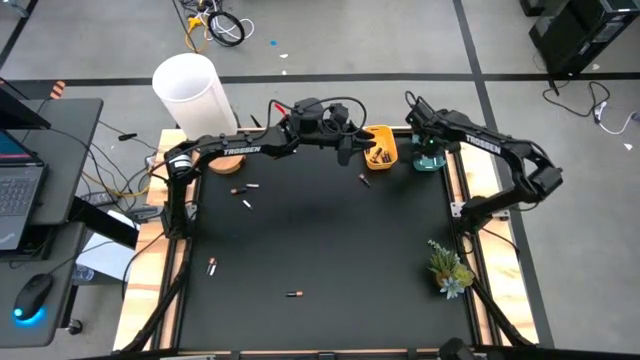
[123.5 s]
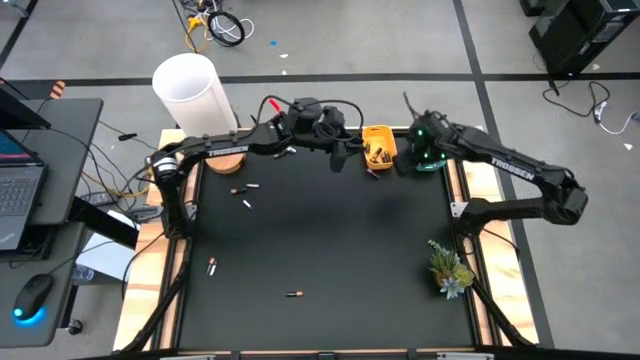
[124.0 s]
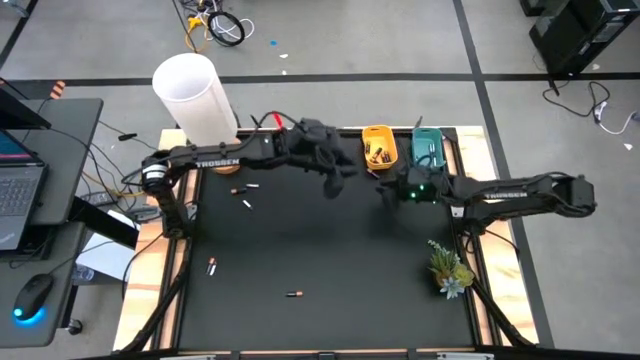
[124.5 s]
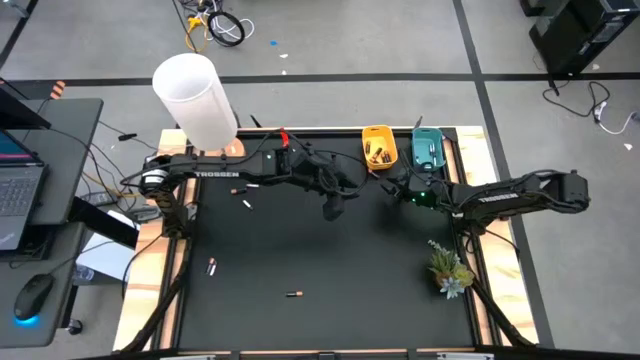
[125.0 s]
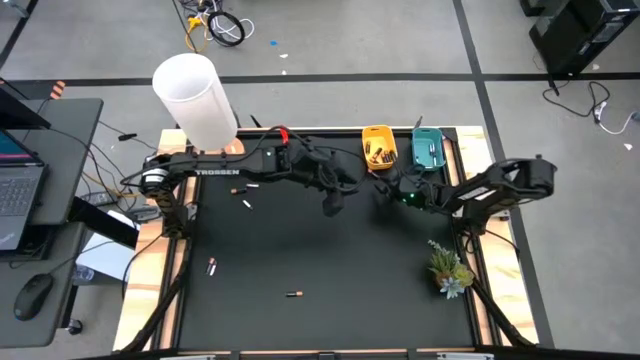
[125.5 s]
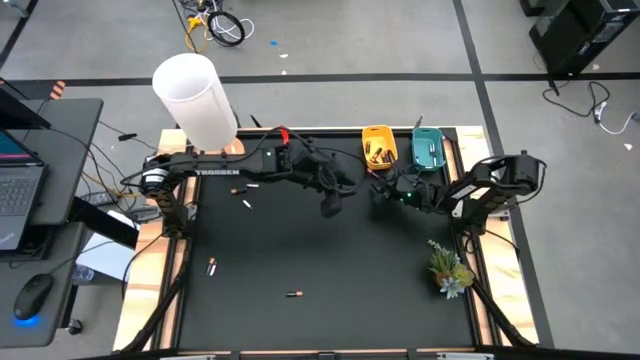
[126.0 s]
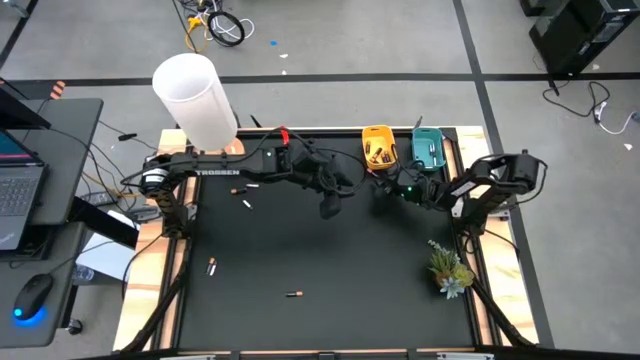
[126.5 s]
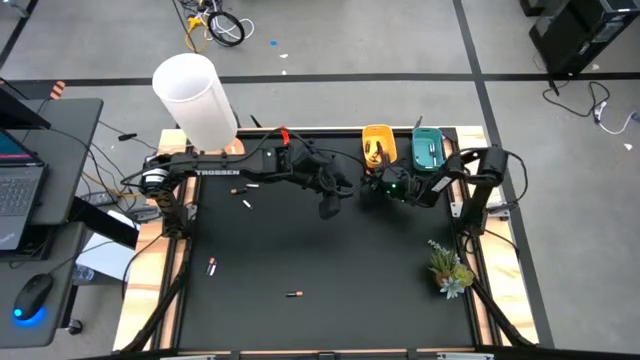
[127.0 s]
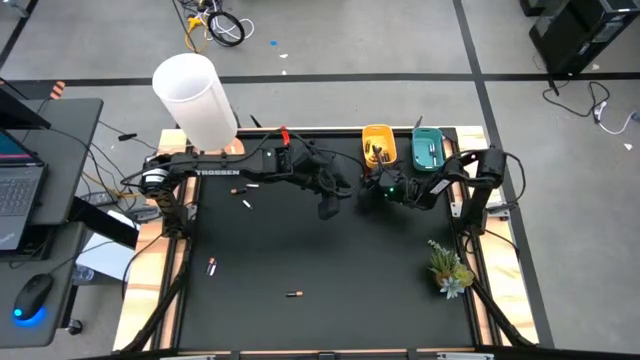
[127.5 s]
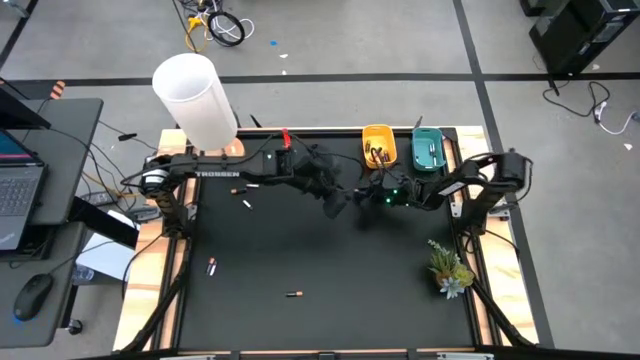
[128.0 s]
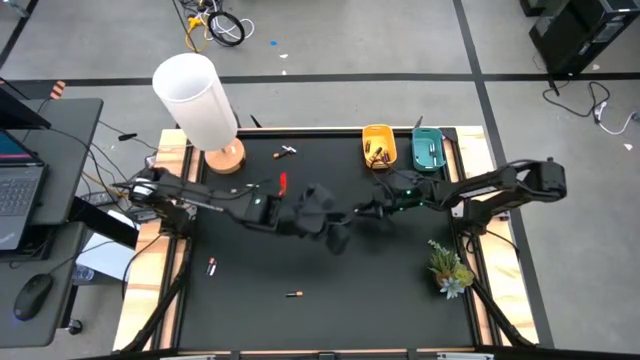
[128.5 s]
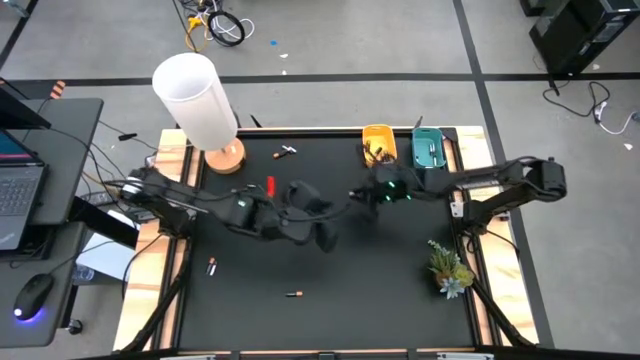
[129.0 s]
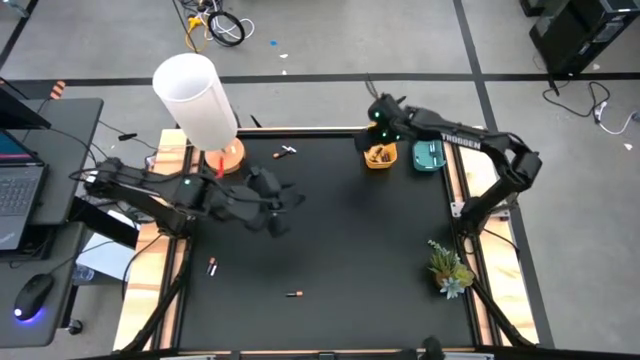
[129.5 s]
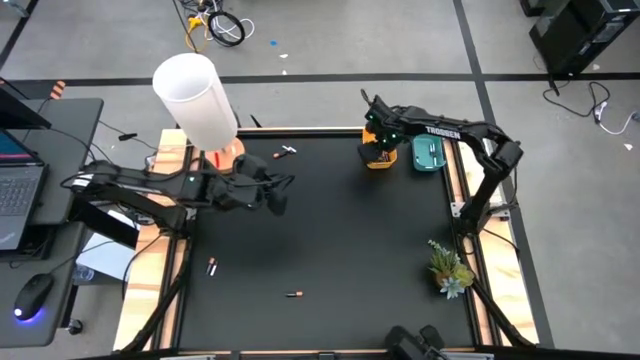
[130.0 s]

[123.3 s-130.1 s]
Task: Sort batteries
Put the black battery into the yellow bin

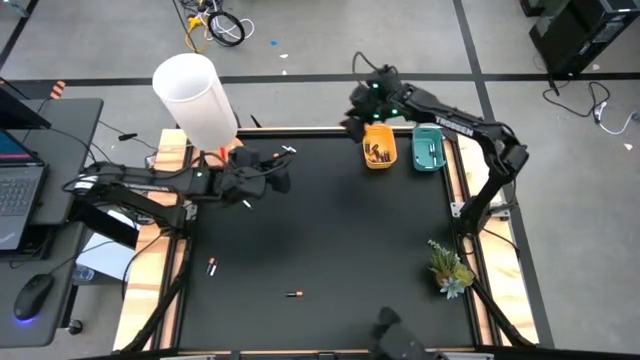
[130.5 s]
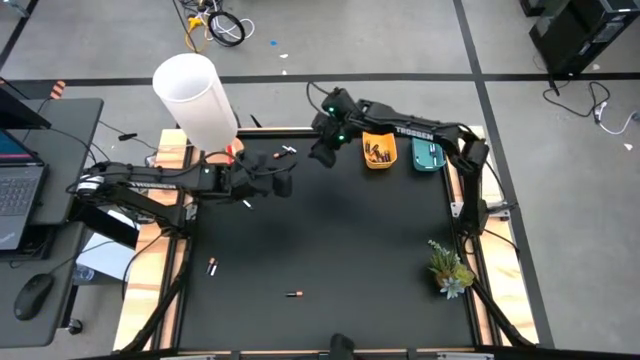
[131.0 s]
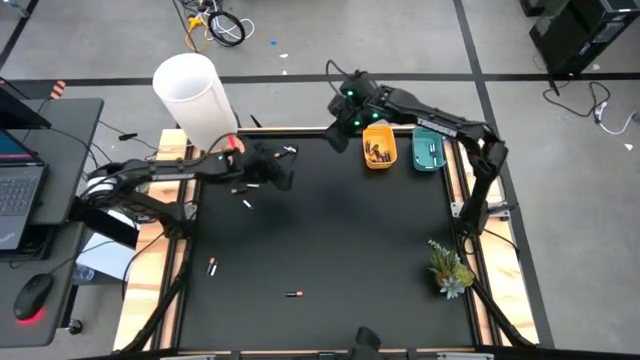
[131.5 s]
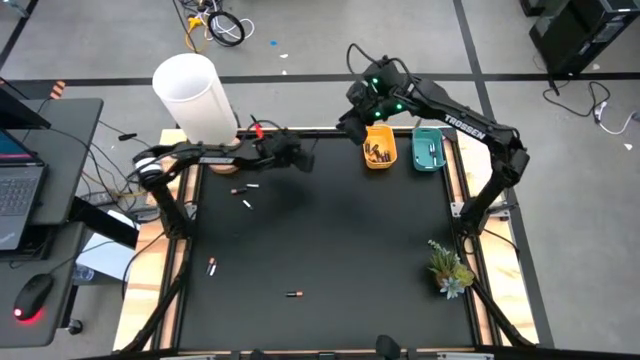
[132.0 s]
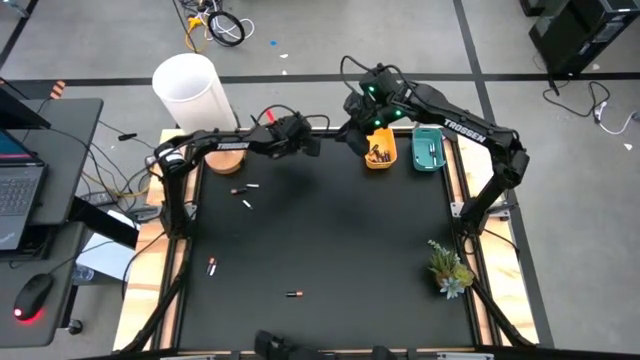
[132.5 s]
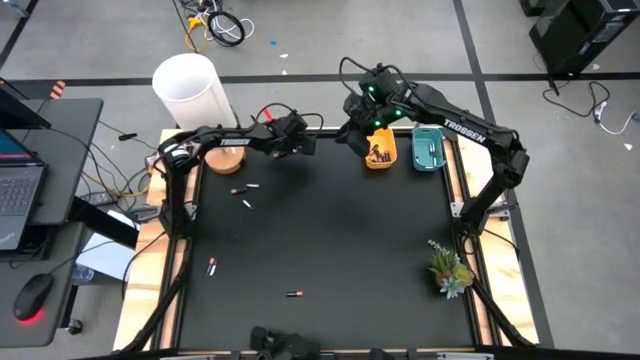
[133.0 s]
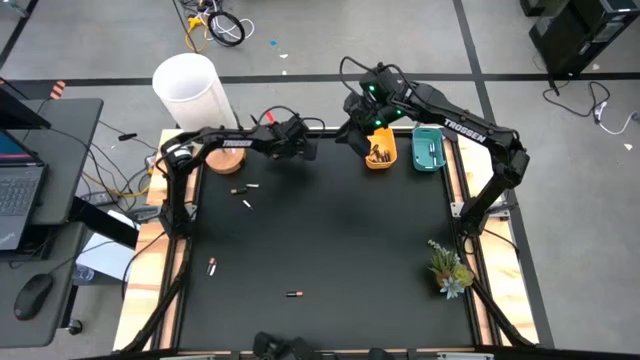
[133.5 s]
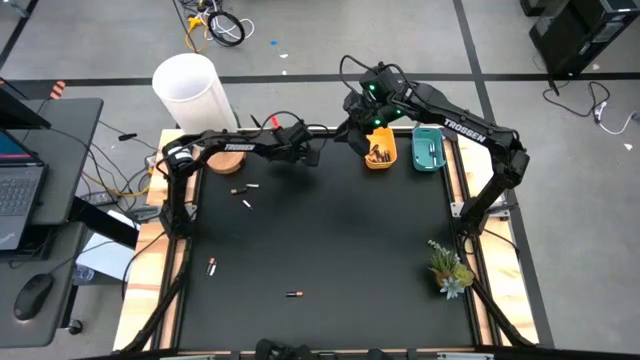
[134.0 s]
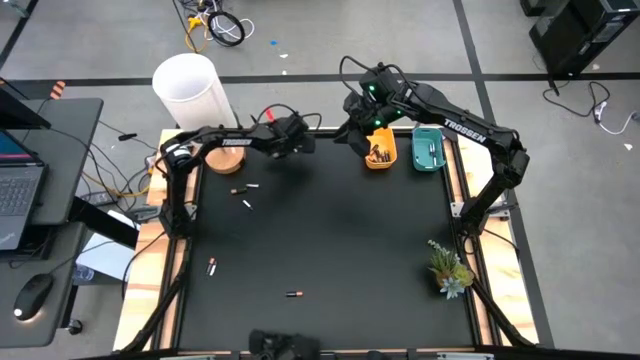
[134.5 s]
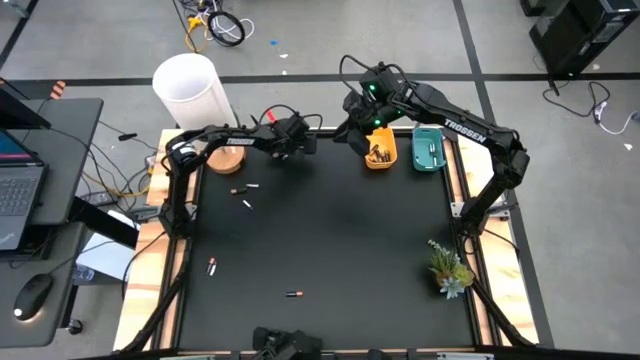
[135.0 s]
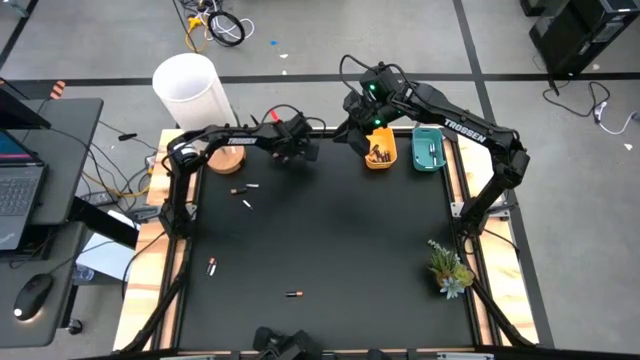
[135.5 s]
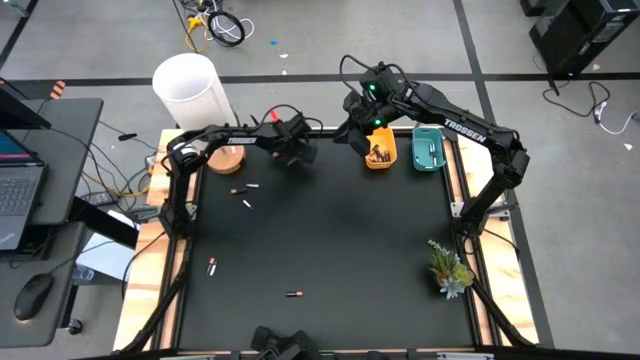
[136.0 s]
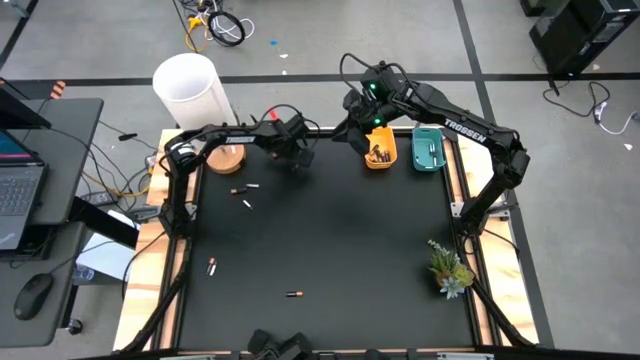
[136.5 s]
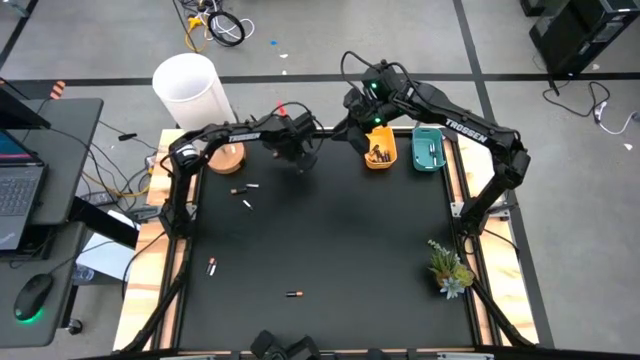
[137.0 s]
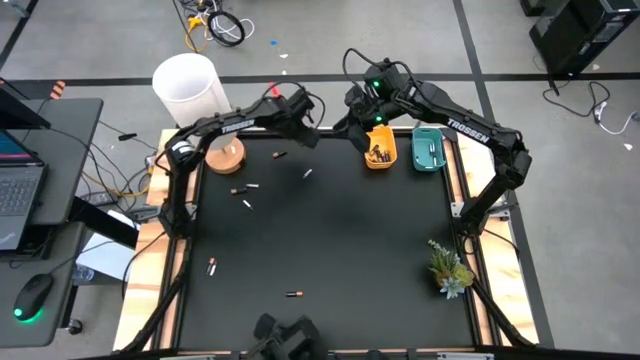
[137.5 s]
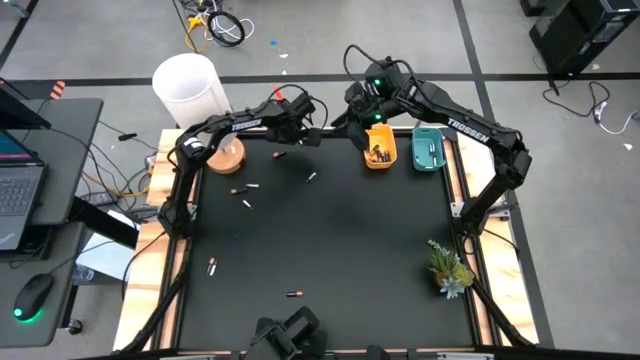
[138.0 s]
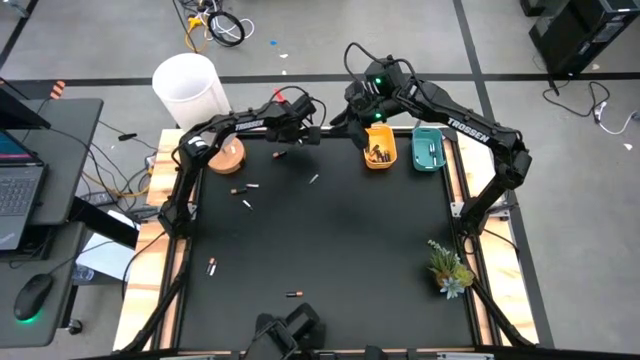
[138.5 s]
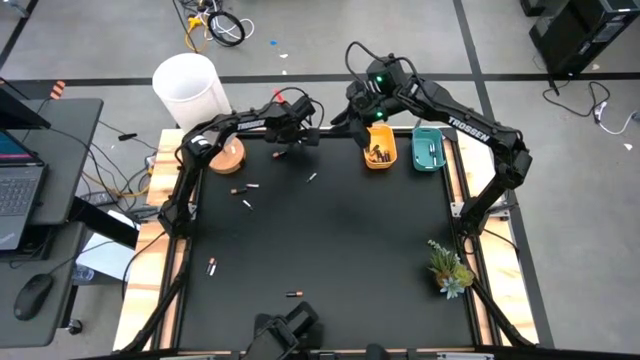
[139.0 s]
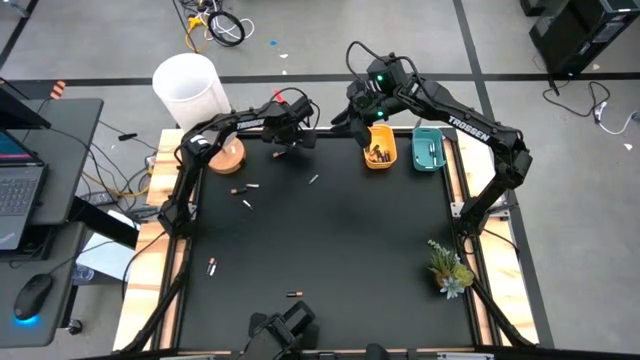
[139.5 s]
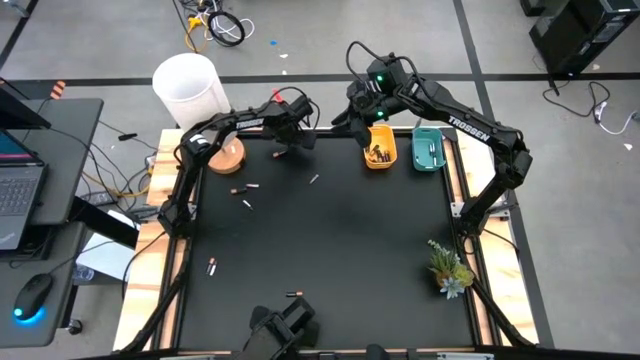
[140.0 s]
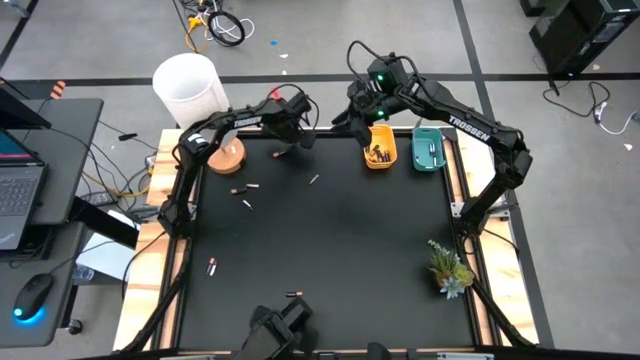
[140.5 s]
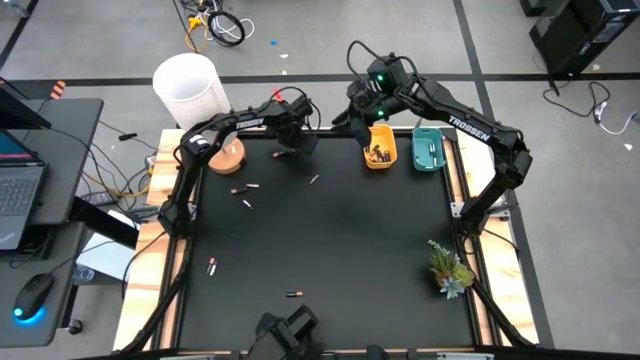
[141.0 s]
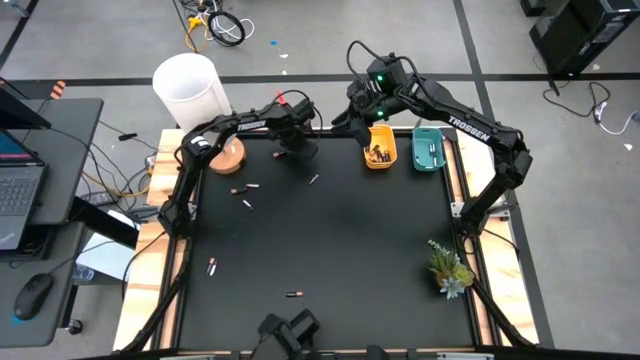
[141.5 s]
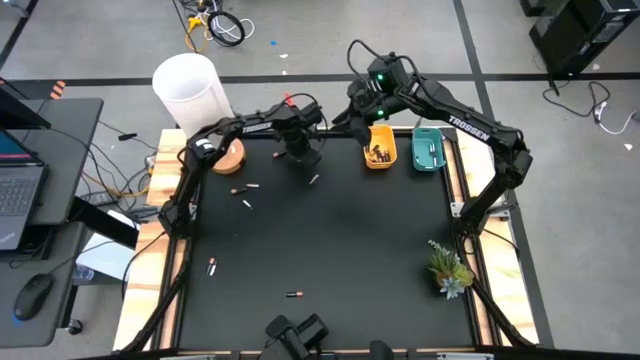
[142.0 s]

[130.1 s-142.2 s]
Put the silver battery into the blue bin

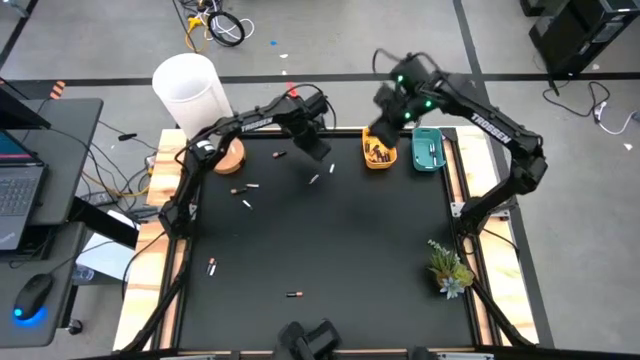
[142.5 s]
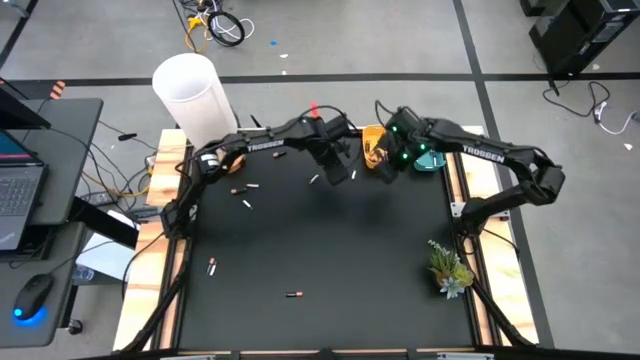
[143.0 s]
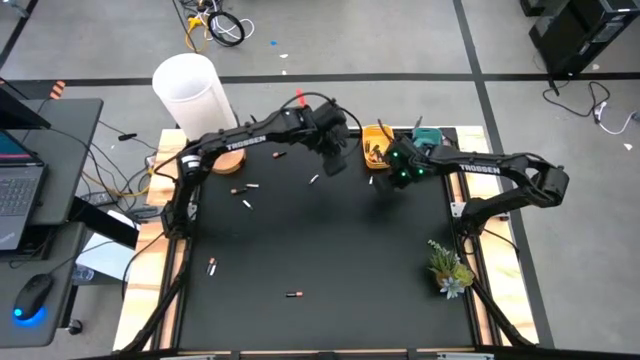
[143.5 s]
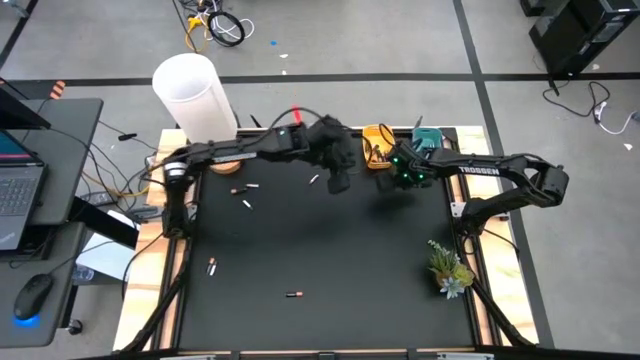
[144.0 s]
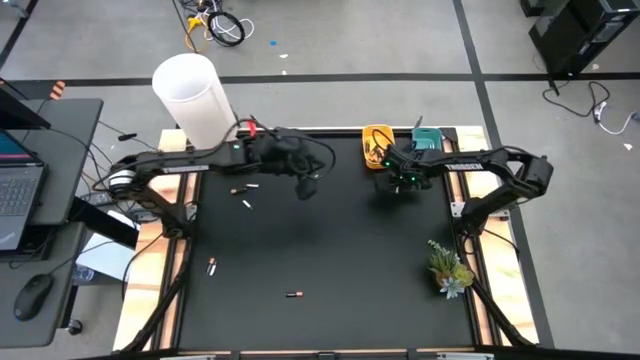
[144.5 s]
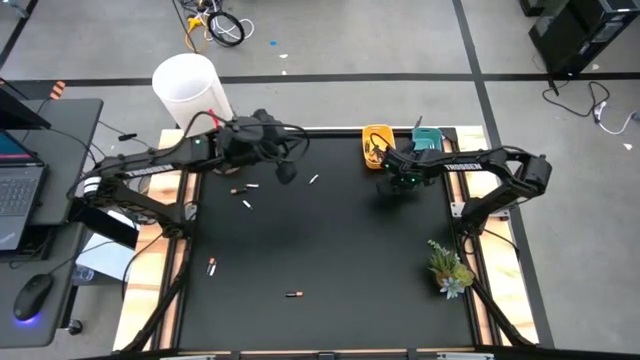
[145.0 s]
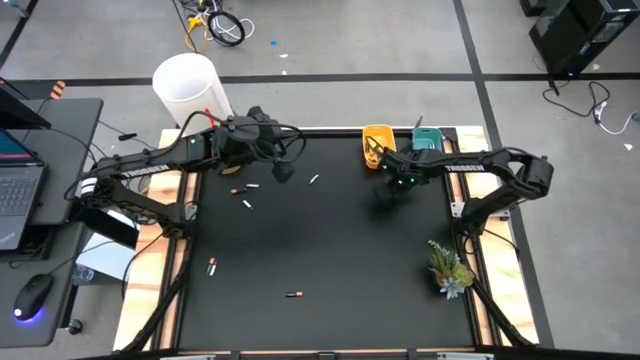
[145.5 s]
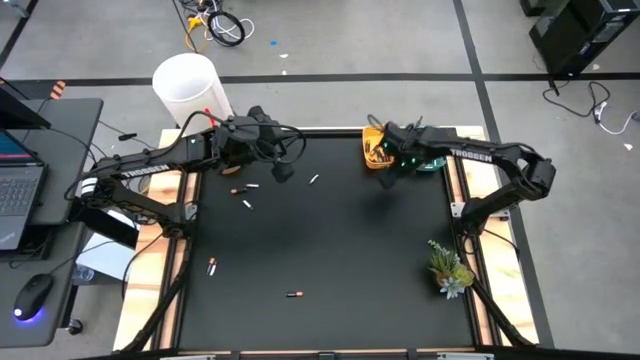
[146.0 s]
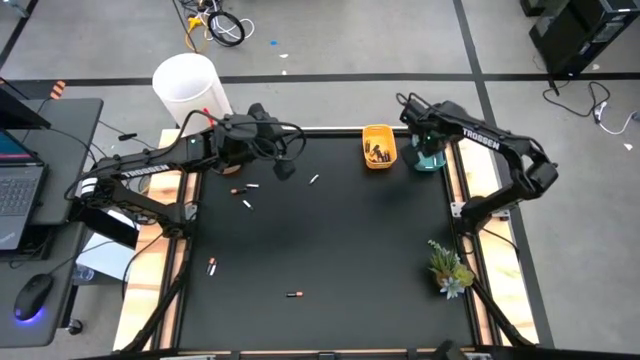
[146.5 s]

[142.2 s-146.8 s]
Put the silver battery into the blue bin
